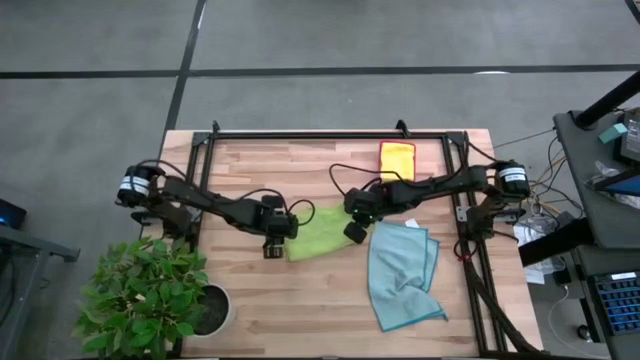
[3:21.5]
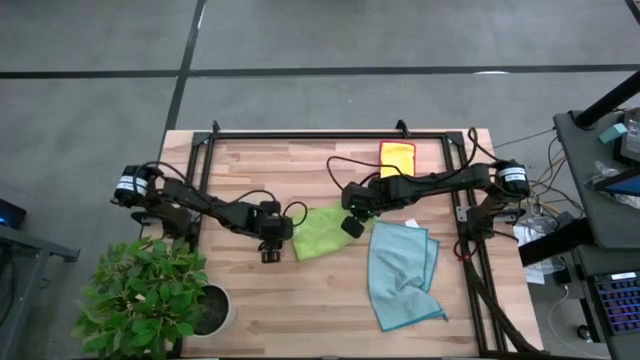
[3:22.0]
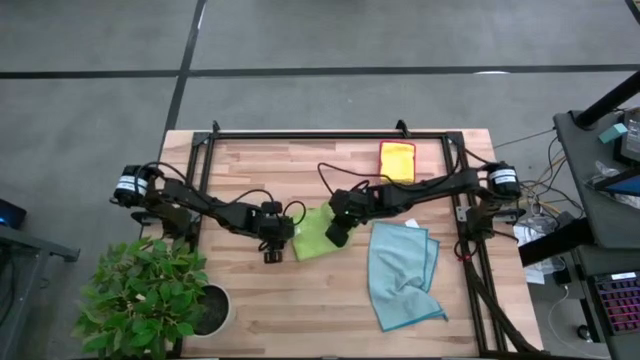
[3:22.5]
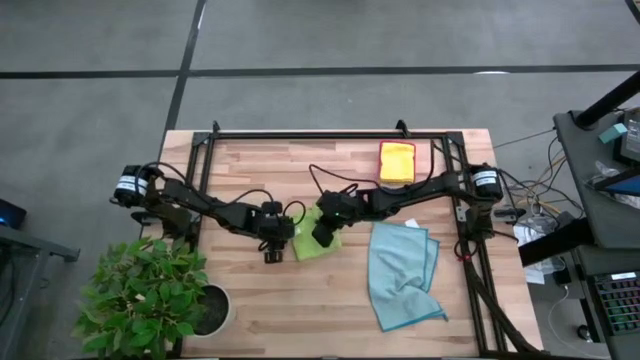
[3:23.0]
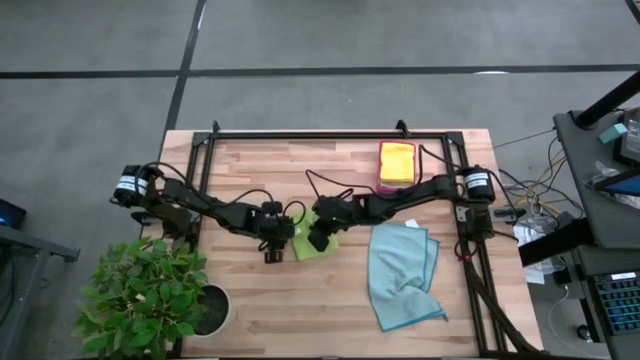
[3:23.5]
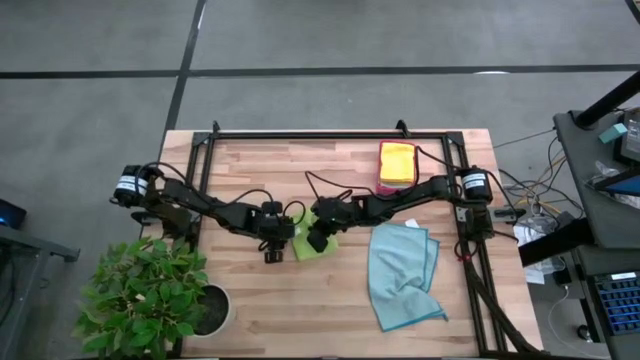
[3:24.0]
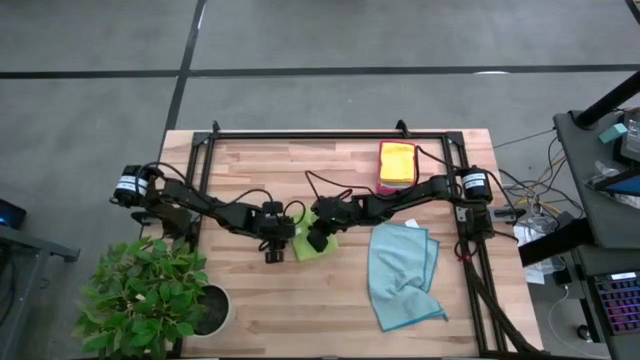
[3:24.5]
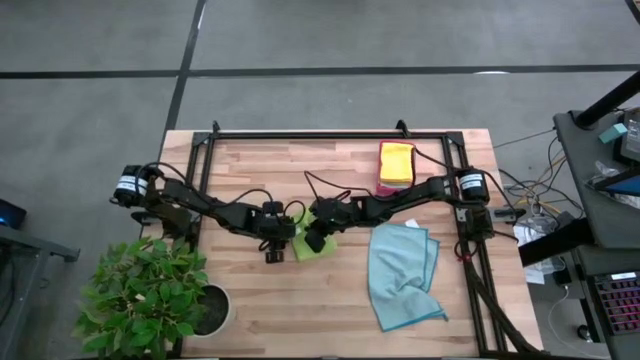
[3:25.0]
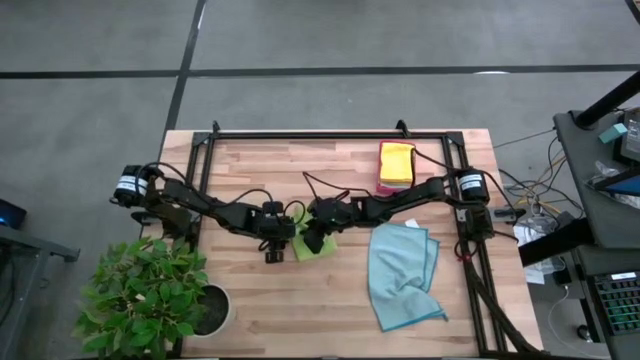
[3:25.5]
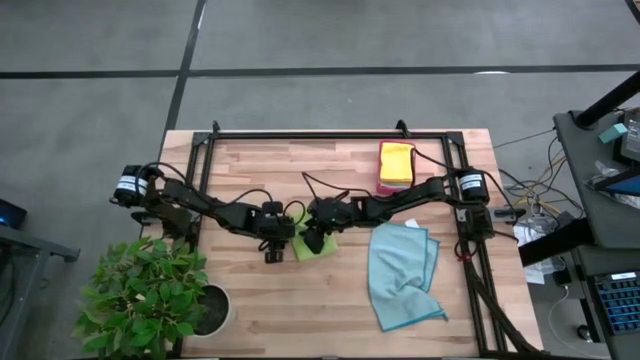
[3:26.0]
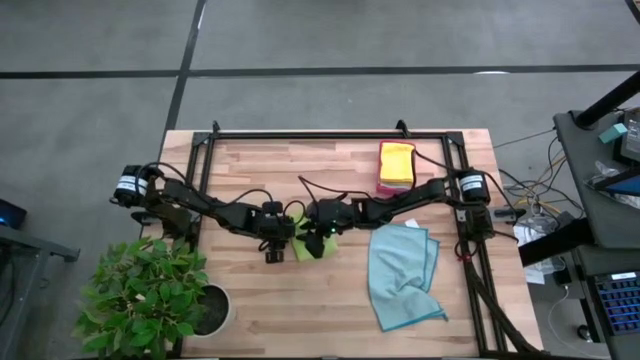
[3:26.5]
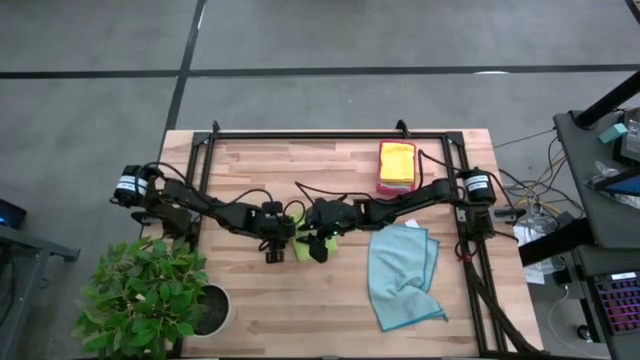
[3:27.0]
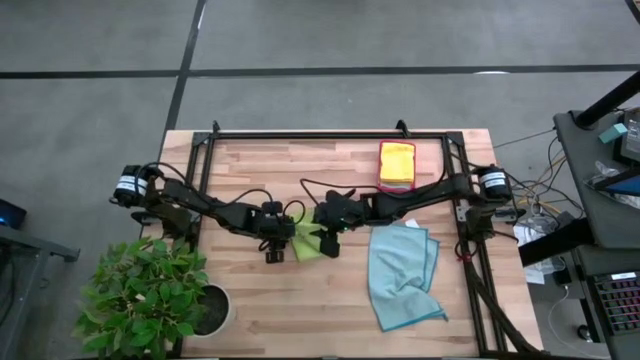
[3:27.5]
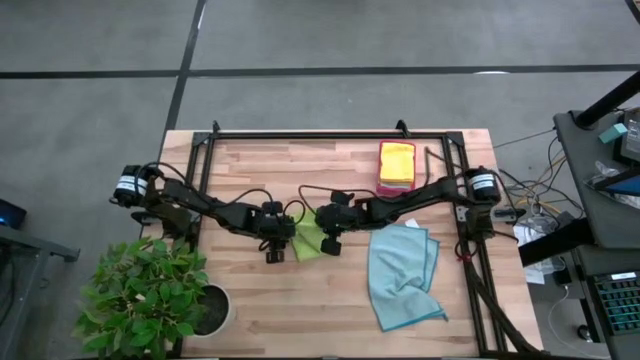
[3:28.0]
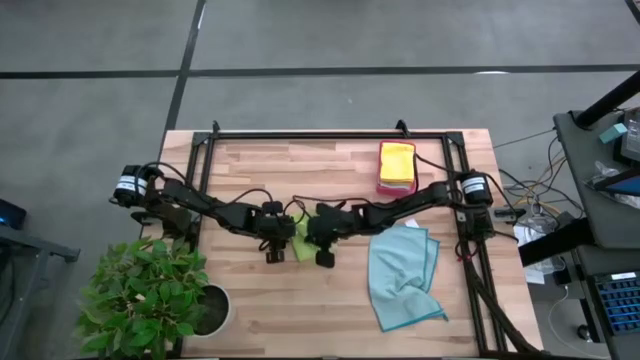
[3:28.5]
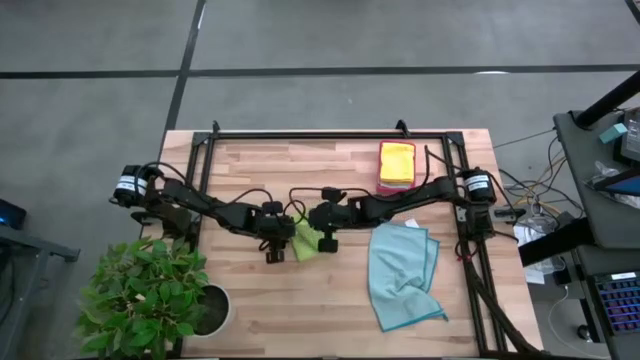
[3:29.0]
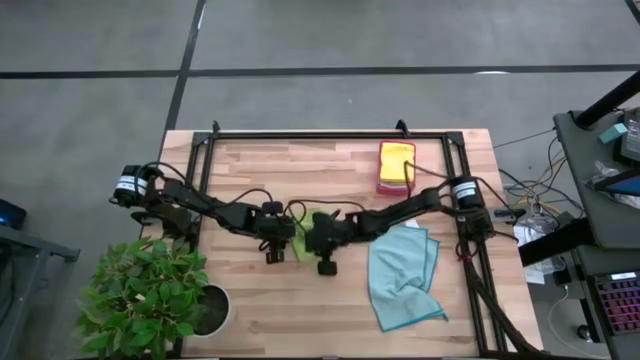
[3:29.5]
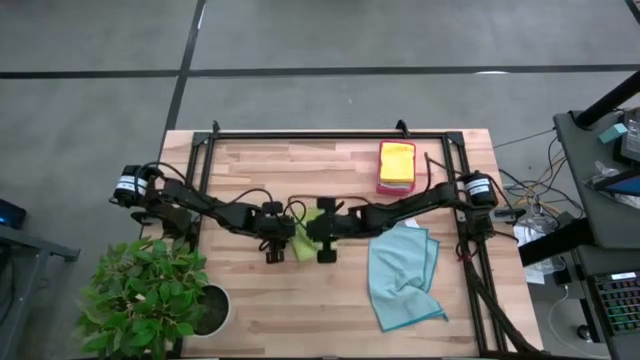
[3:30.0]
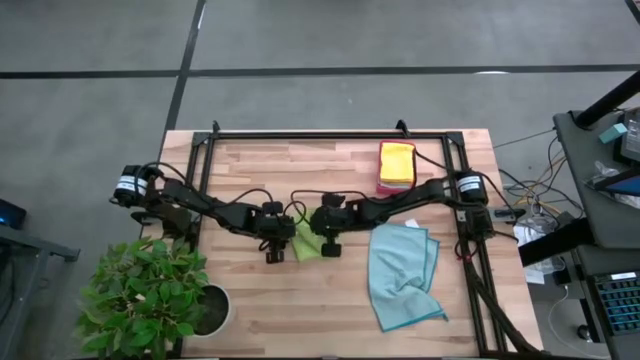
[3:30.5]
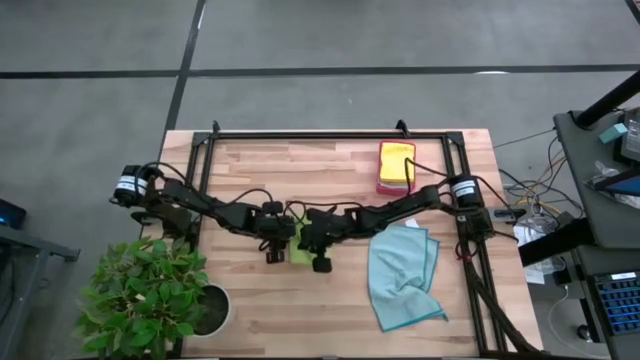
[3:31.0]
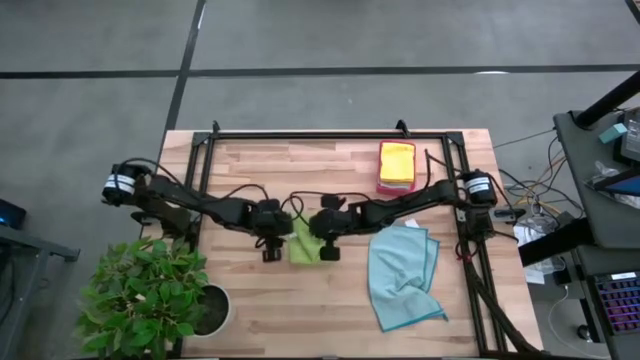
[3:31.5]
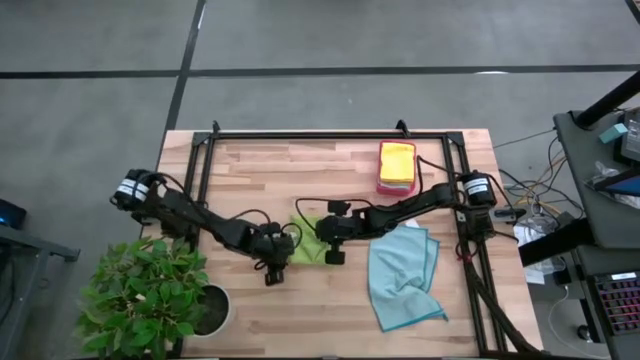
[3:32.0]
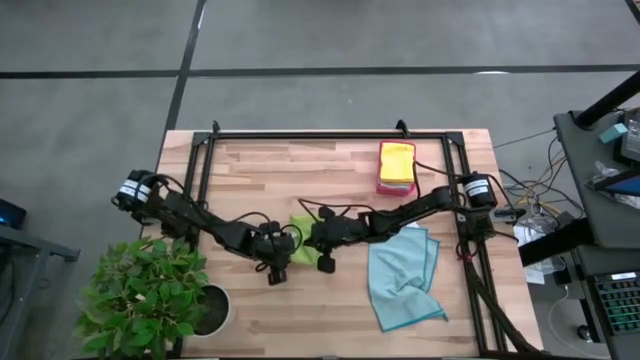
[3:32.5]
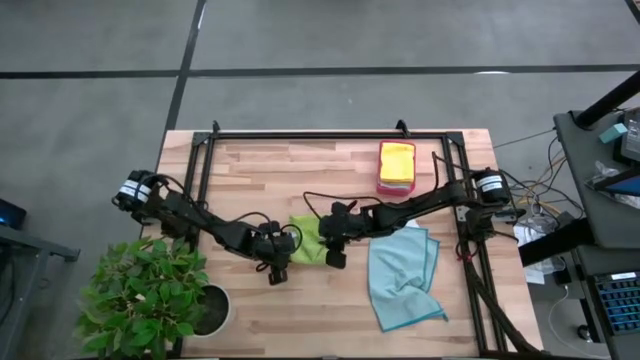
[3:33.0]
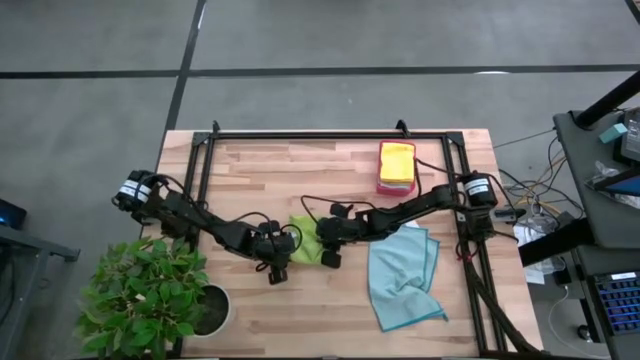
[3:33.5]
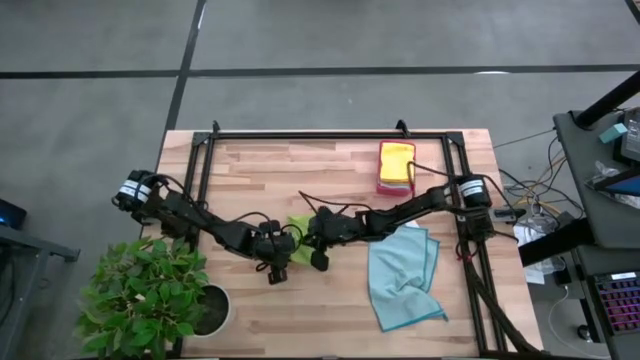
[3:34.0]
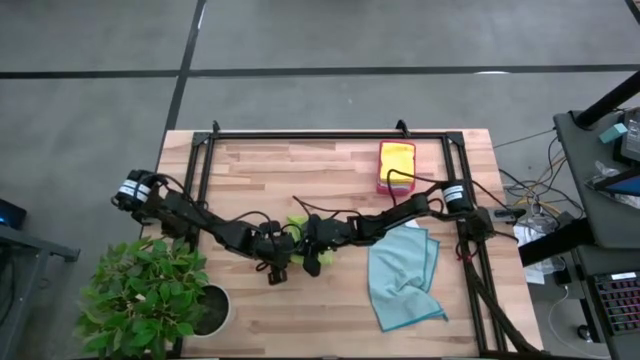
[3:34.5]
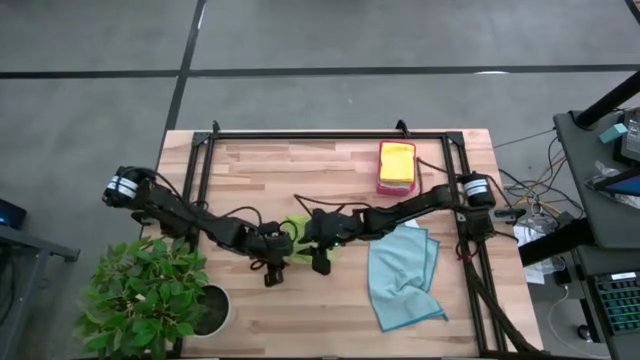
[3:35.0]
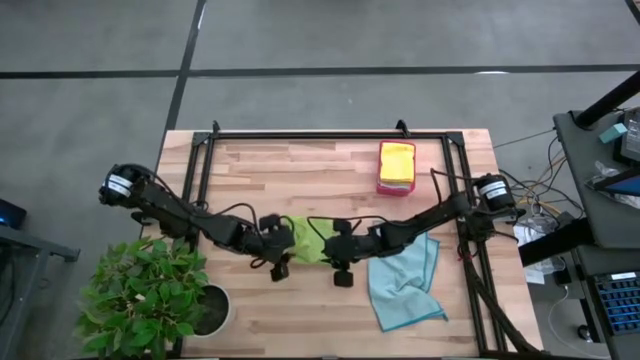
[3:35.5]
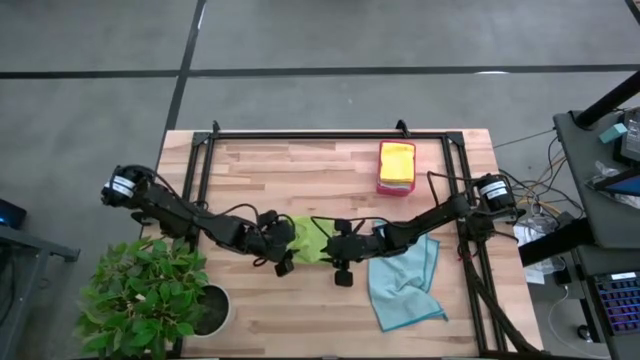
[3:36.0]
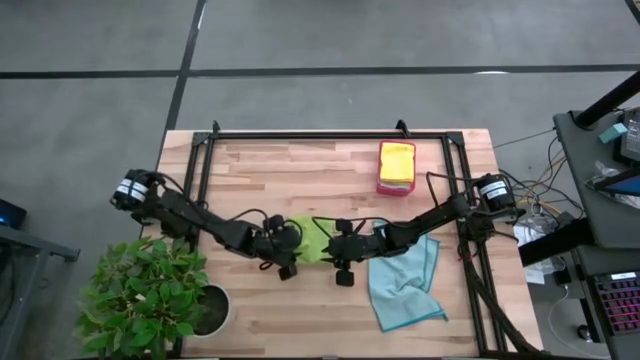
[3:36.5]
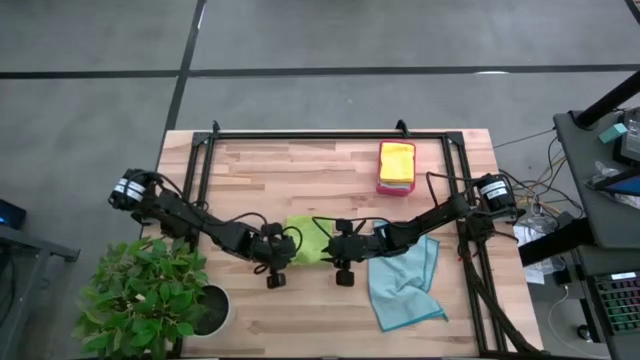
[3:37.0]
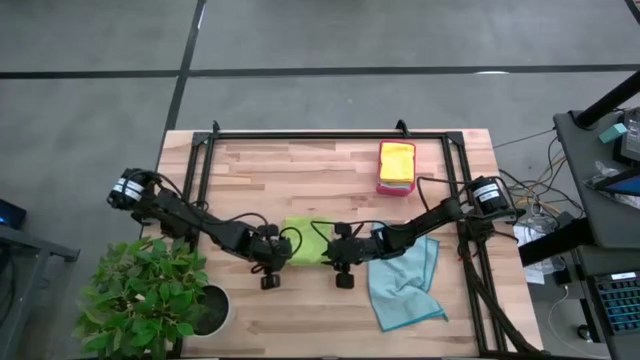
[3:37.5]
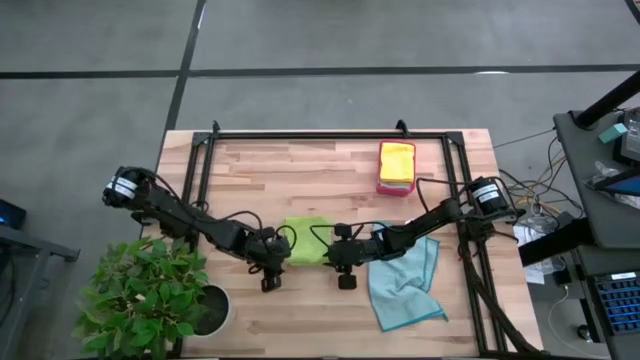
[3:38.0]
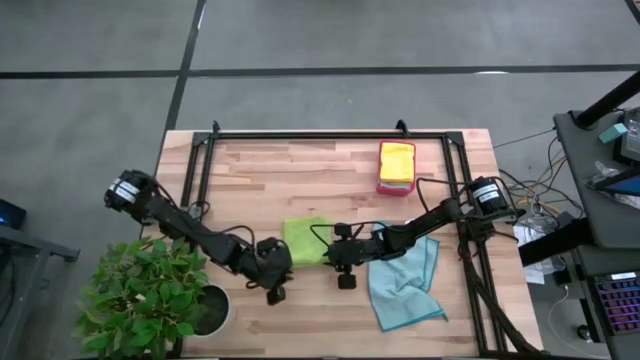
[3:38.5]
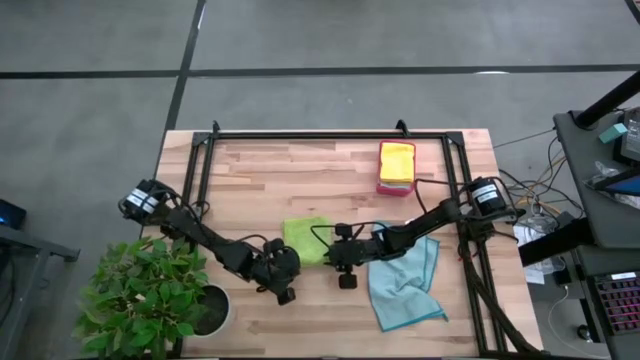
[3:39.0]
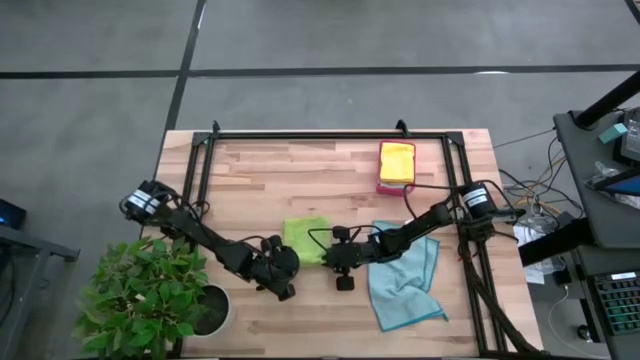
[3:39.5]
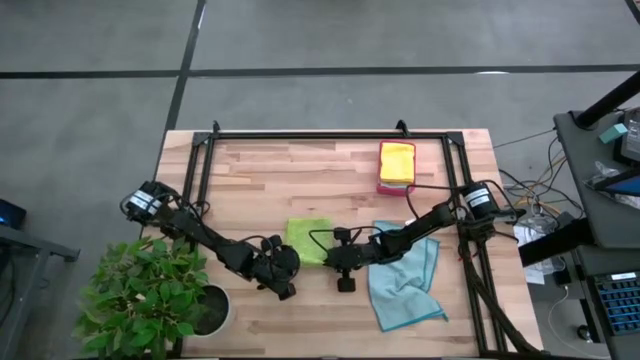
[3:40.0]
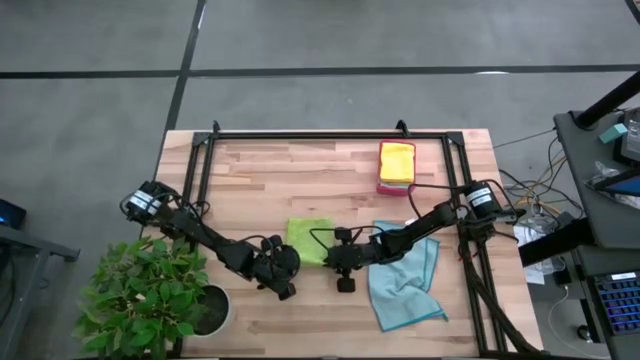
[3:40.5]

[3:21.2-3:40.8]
Task: Fold microfiber towels
Fold the green microfiber towel

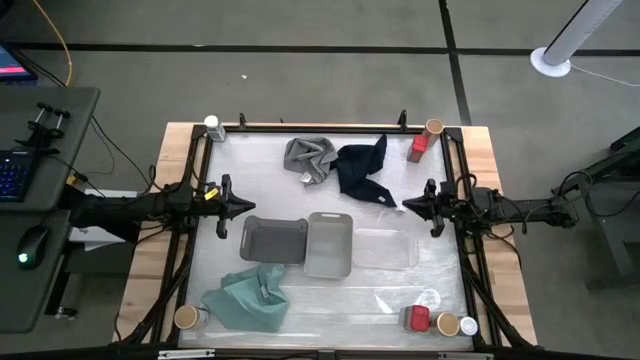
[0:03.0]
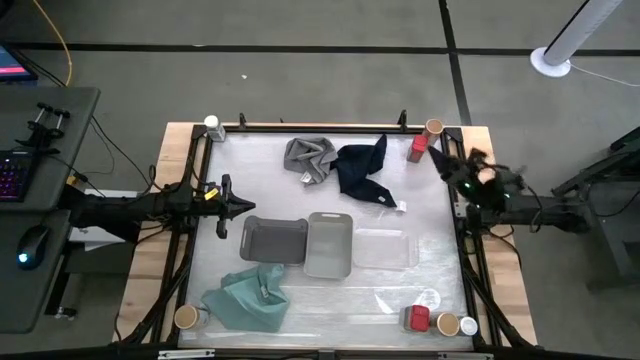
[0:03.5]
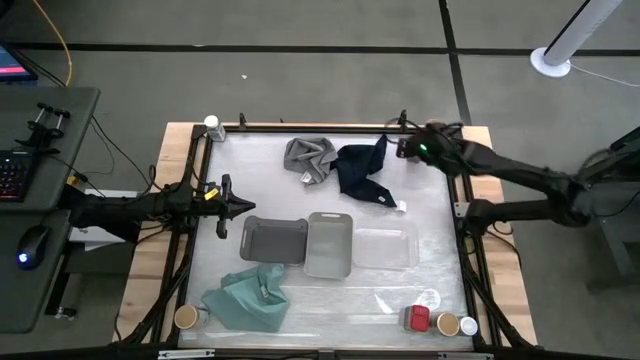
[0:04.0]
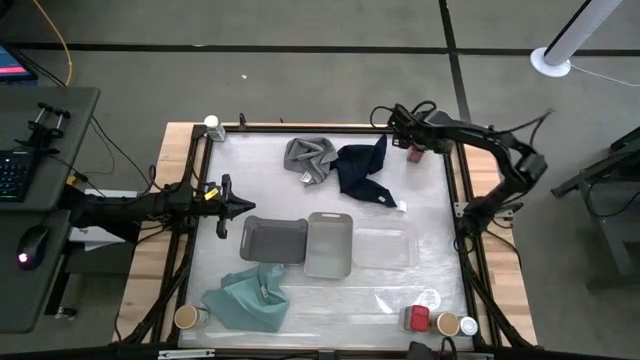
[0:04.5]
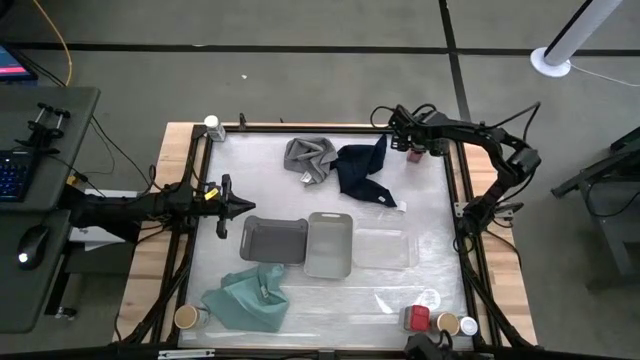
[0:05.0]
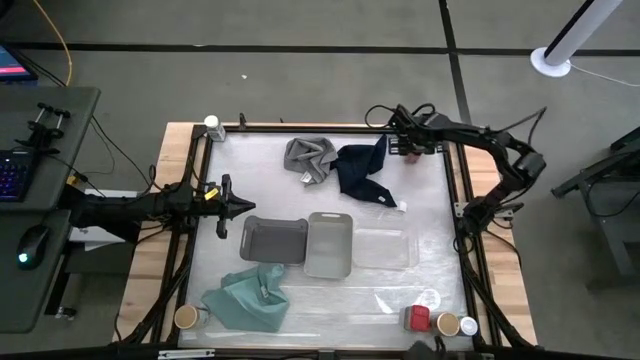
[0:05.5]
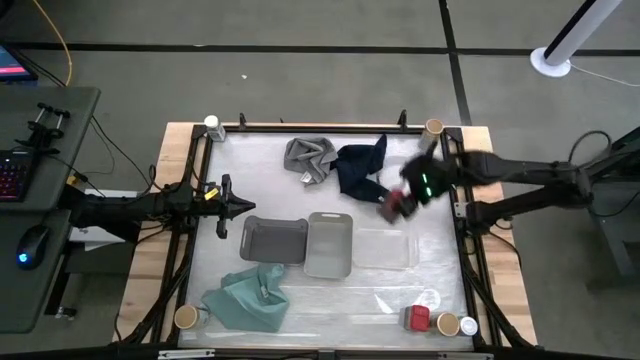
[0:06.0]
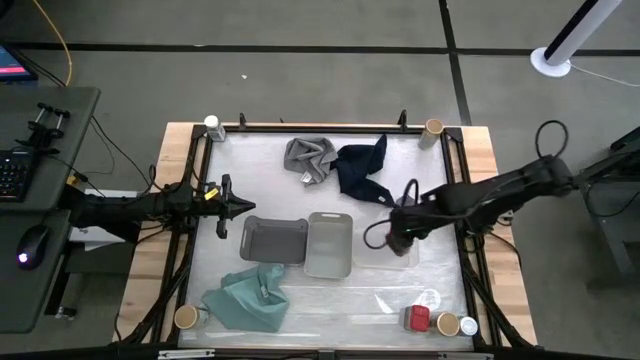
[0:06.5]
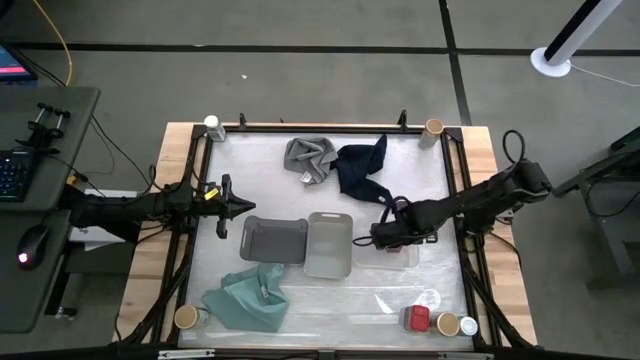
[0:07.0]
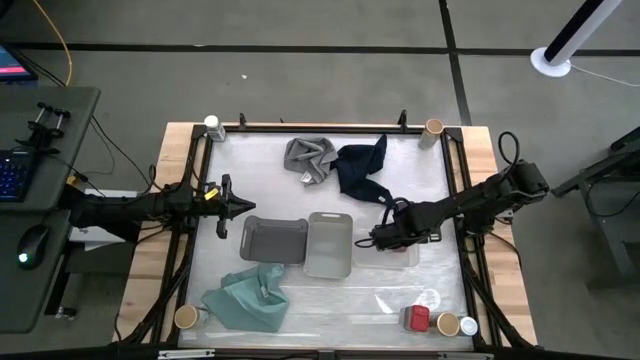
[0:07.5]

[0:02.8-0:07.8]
Task: Sort spices by type
Put the top red spice can into the transparent bin
